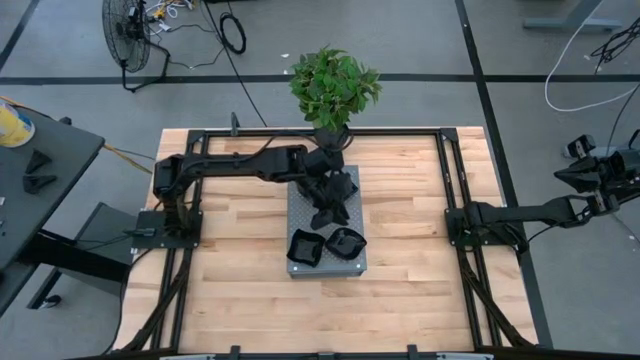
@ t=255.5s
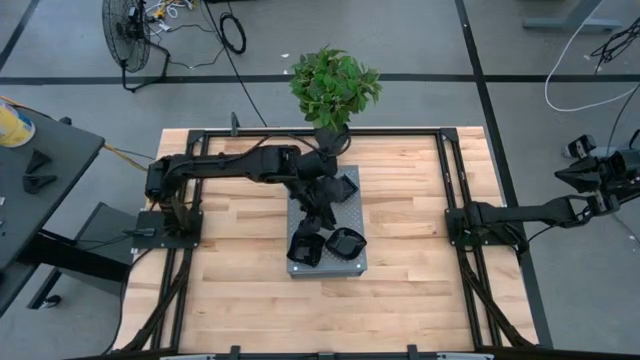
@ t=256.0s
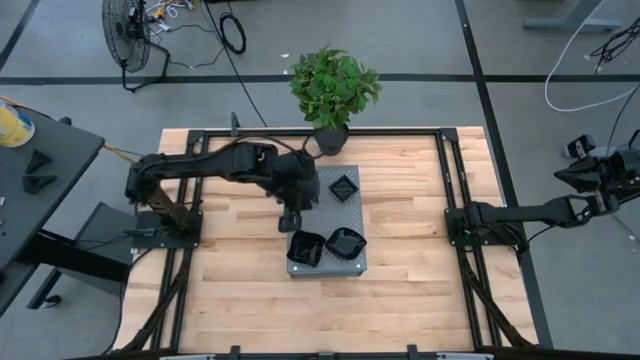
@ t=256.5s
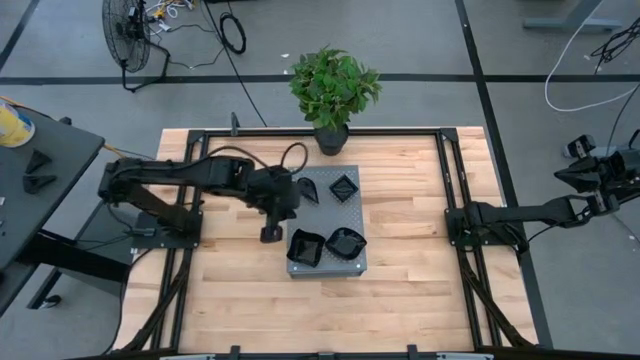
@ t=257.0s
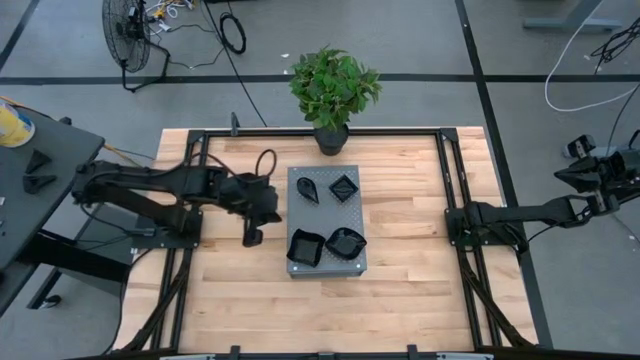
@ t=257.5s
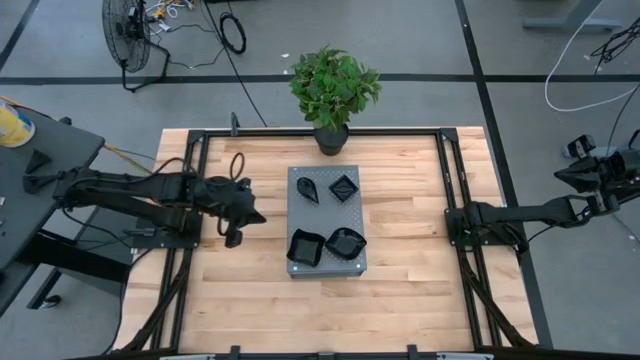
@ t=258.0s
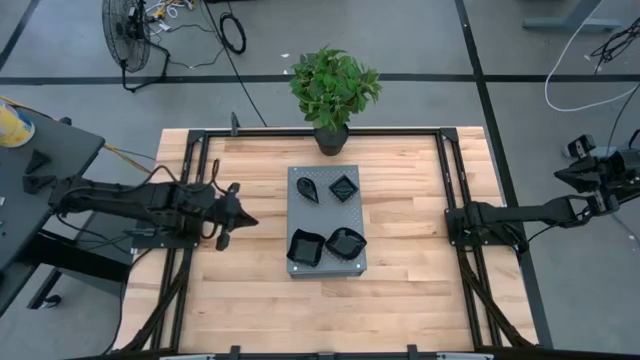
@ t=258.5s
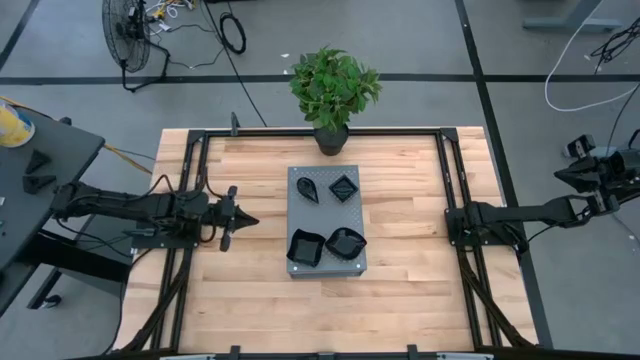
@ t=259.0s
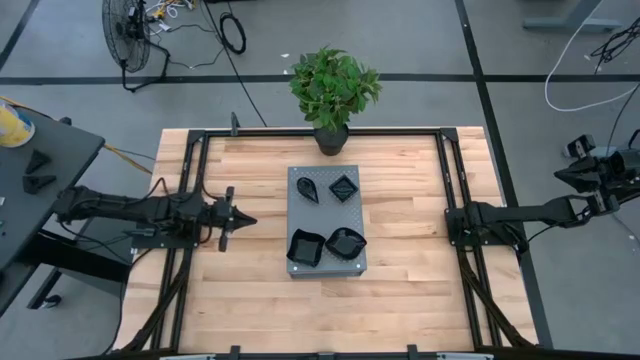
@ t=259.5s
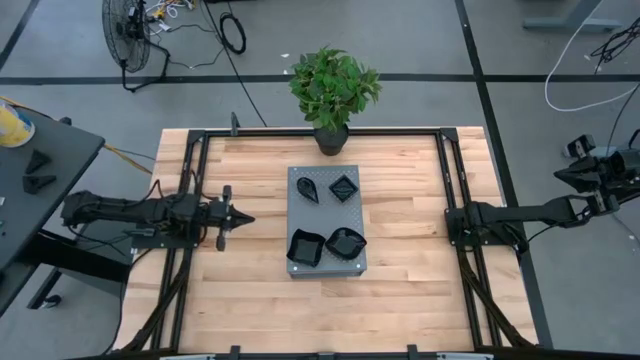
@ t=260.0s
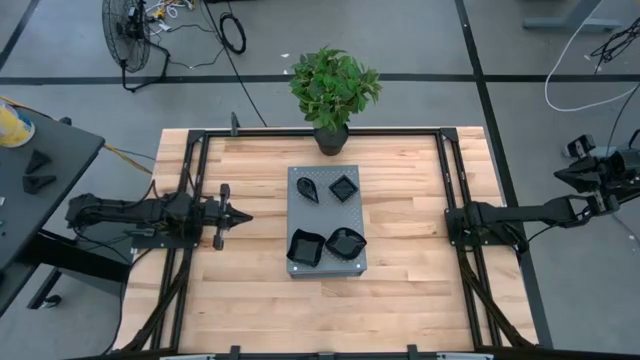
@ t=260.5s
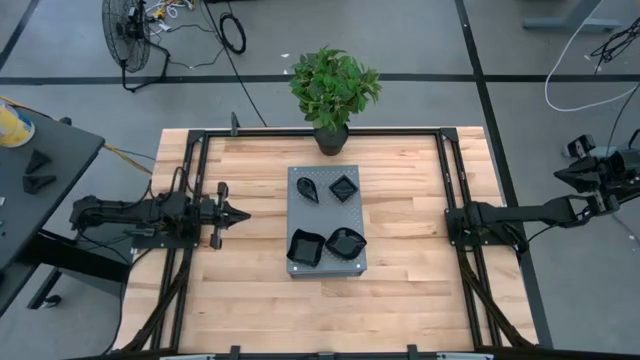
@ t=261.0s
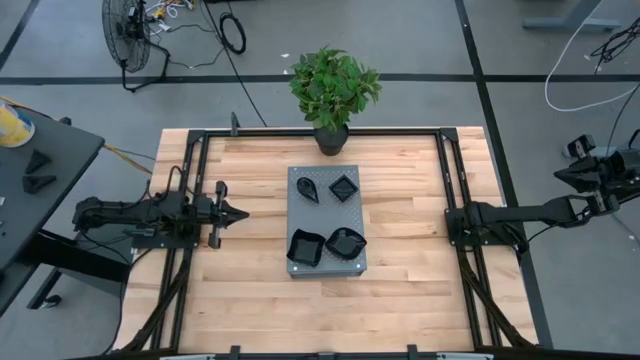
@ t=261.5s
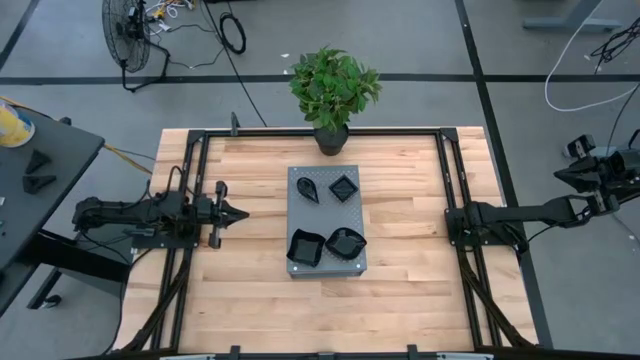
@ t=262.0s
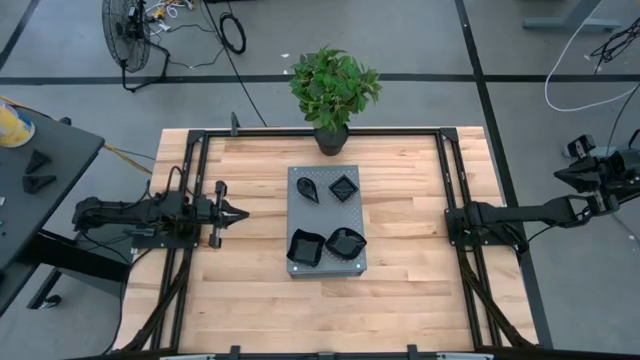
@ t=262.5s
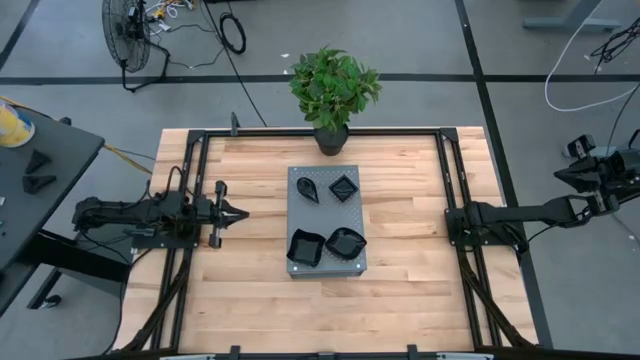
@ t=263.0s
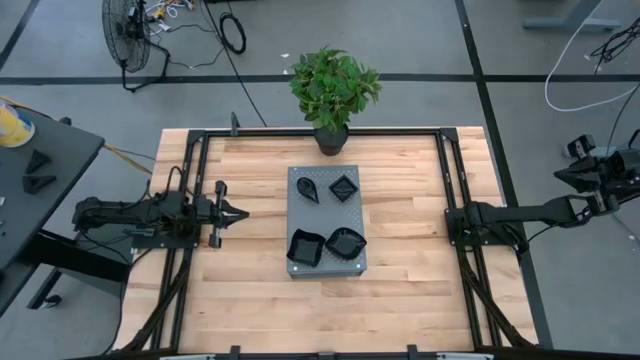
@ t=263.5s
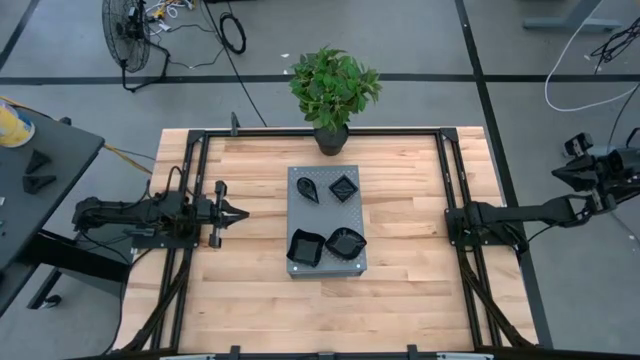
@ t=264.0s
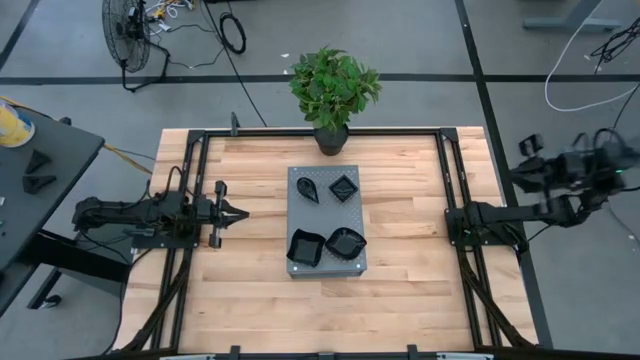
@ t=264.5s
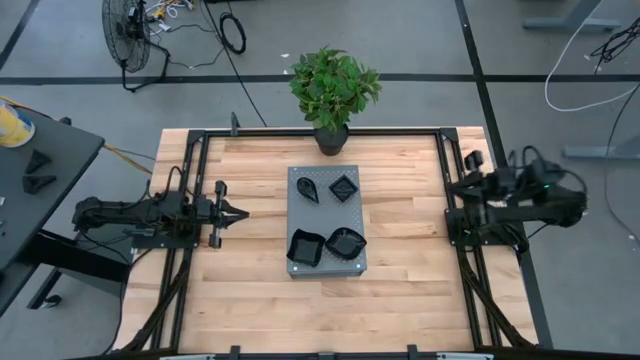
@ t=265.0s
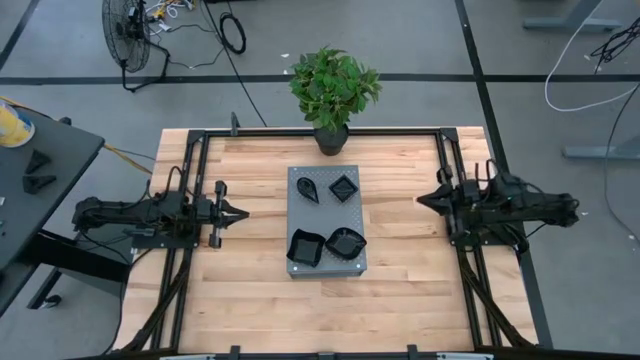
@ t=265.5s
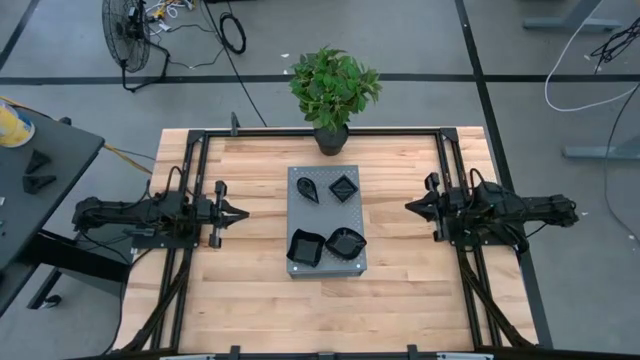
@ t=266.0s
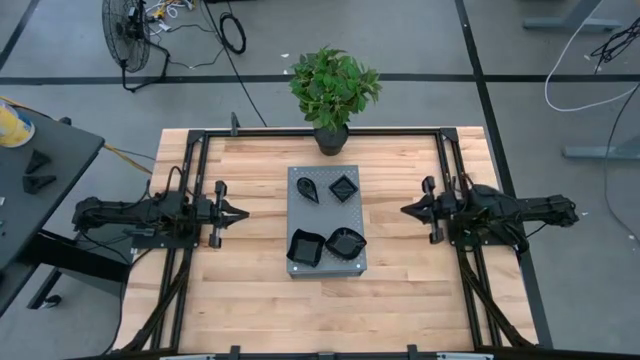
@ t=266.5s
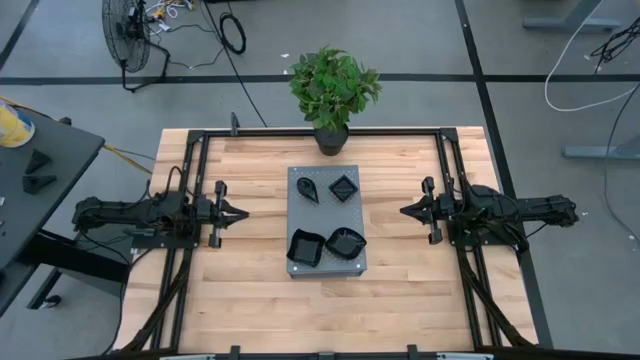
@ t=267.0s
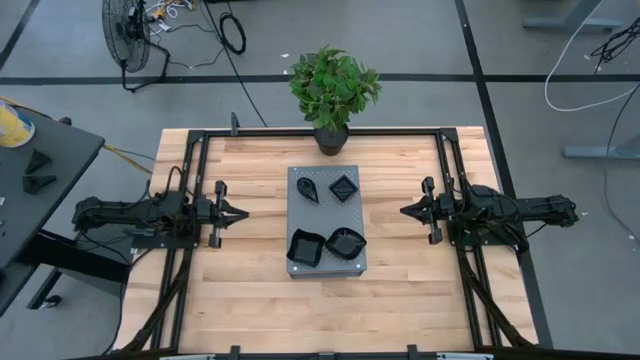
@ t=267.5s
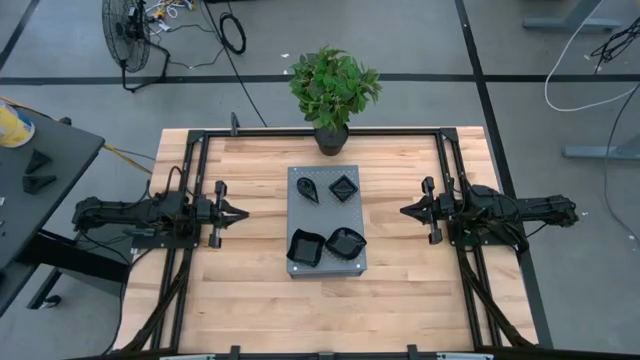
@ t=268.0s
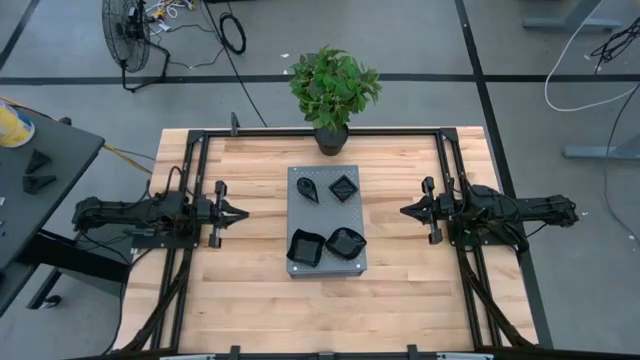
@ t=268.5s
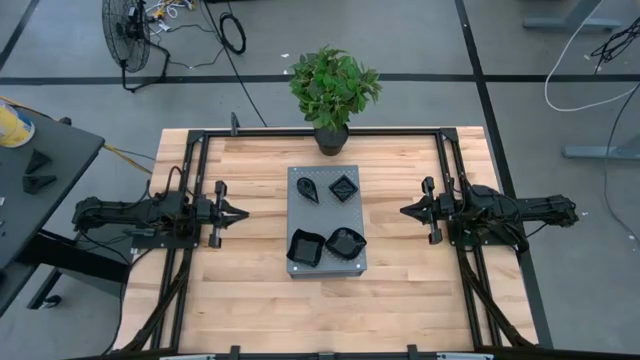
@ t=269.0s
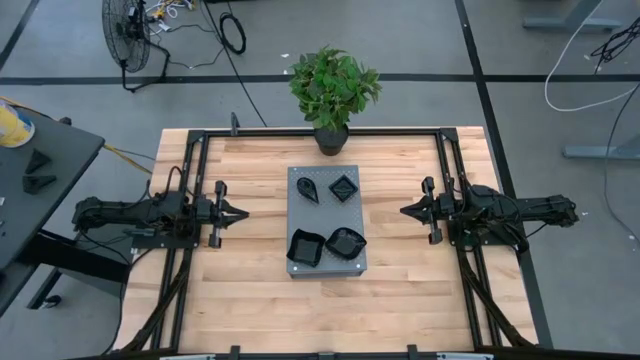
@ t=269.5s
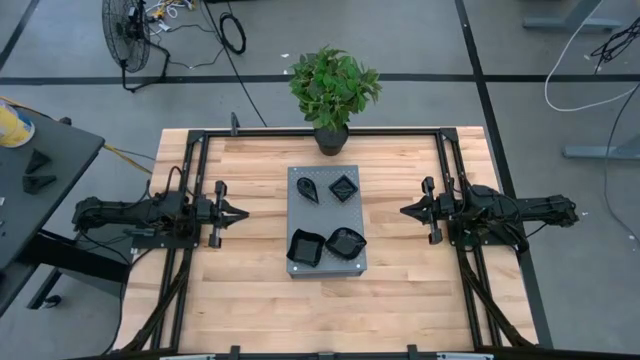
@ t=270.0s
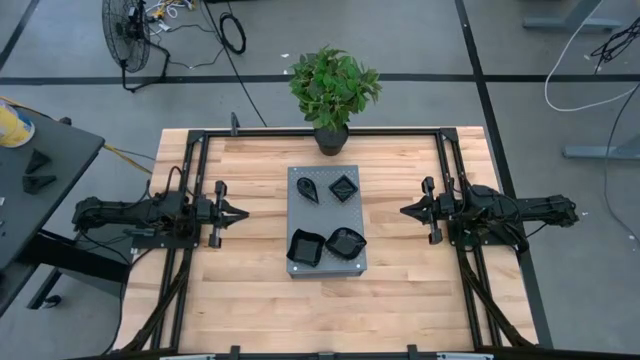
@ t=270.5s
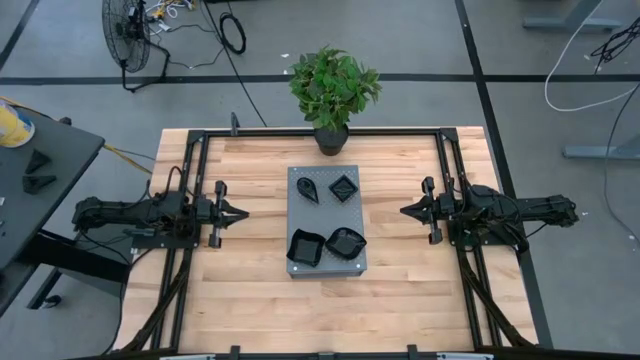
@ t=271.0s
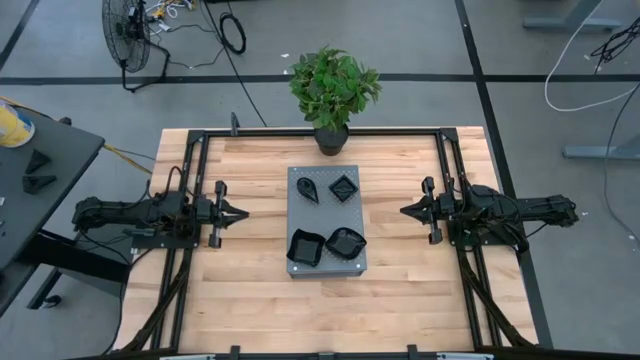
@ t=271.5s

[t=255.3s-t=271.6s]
Task: Pick & Place Mini shaped plates
Return to Home Position

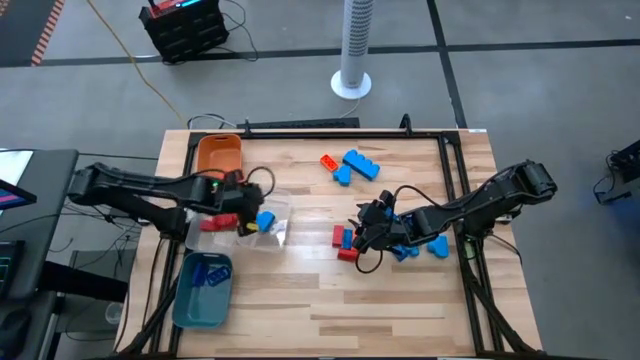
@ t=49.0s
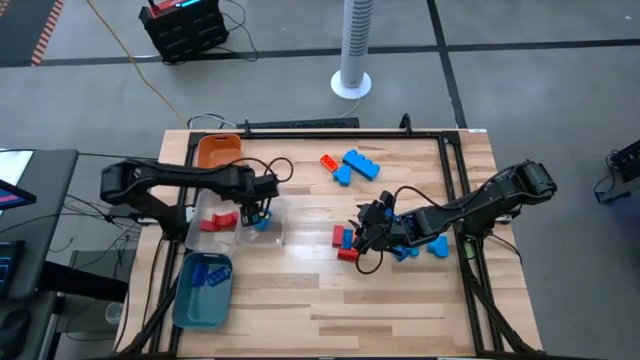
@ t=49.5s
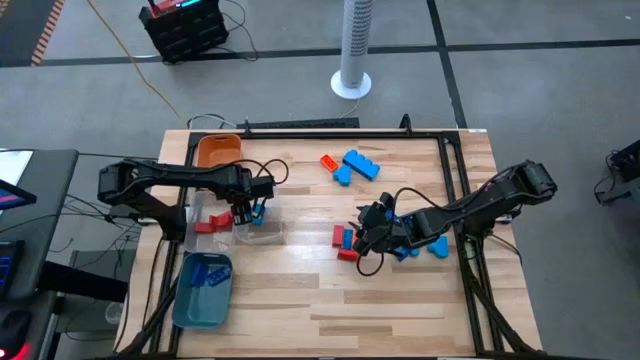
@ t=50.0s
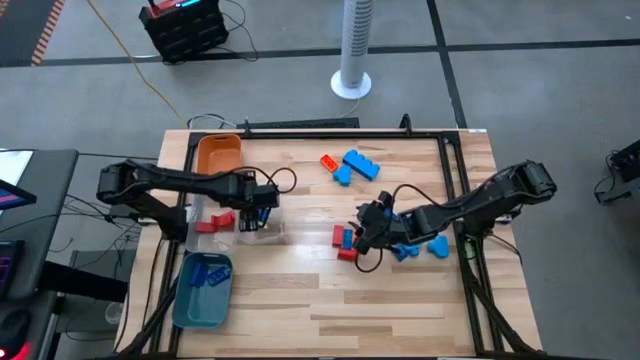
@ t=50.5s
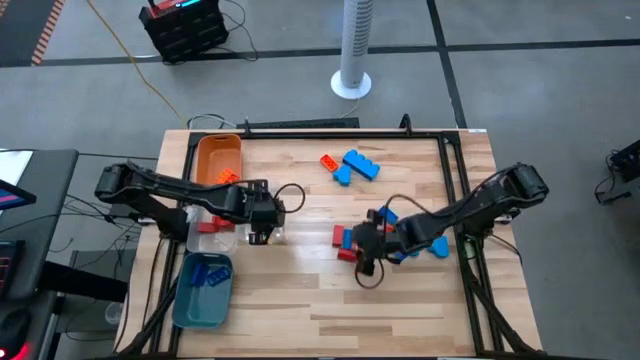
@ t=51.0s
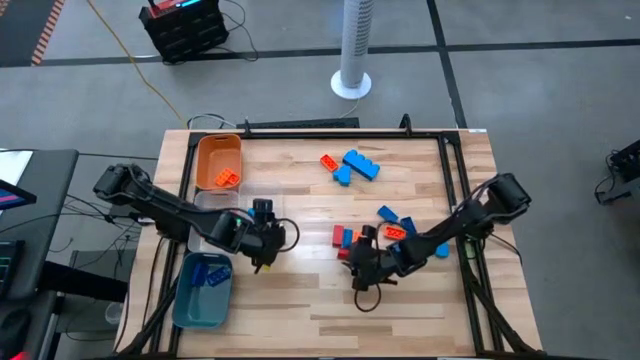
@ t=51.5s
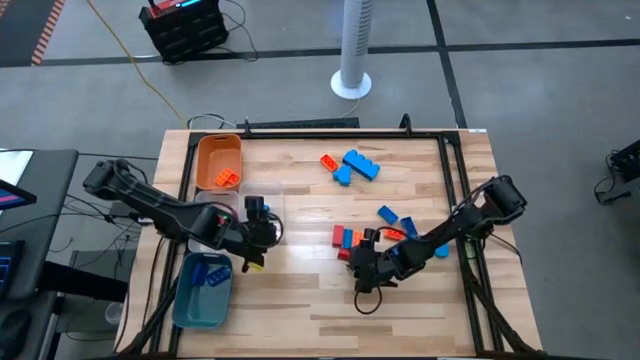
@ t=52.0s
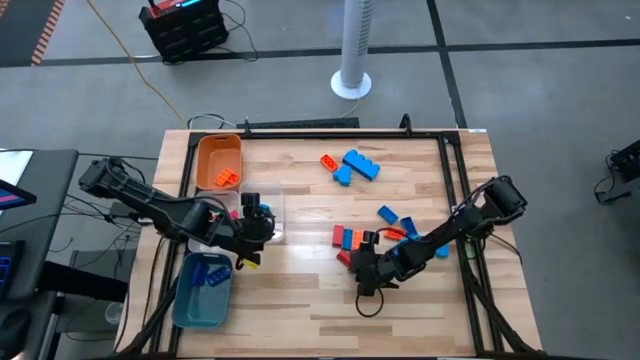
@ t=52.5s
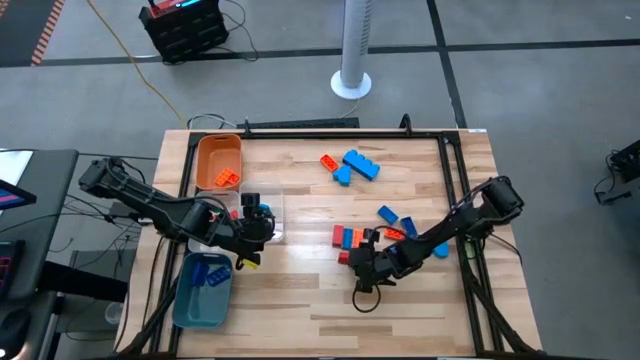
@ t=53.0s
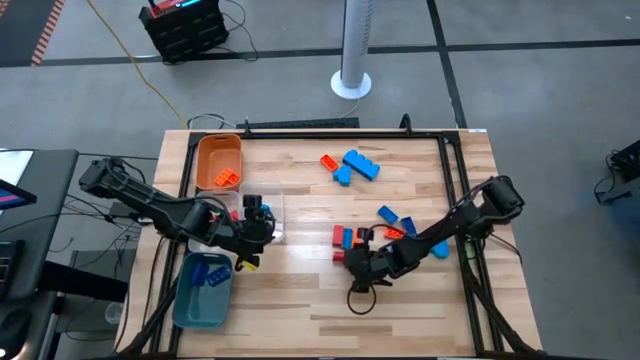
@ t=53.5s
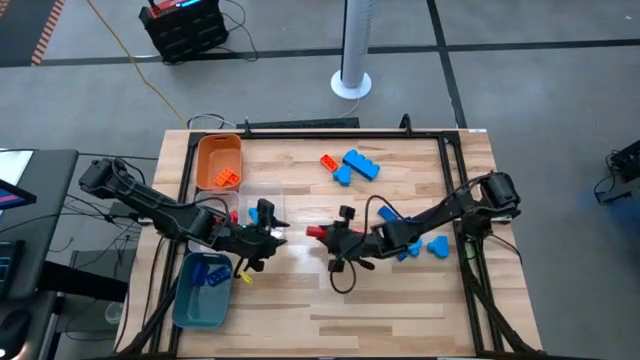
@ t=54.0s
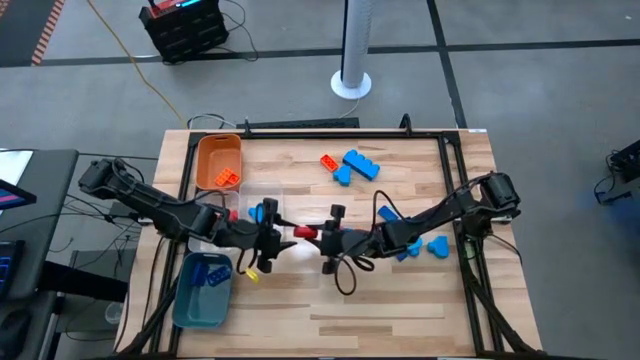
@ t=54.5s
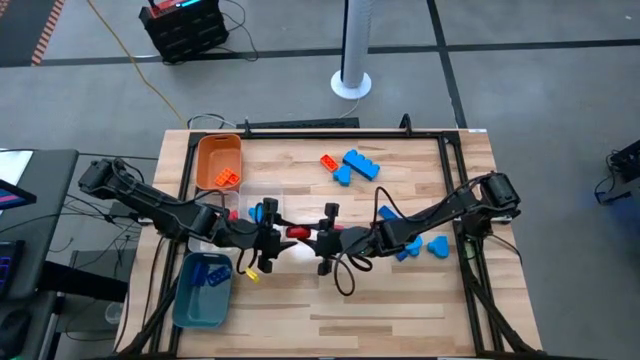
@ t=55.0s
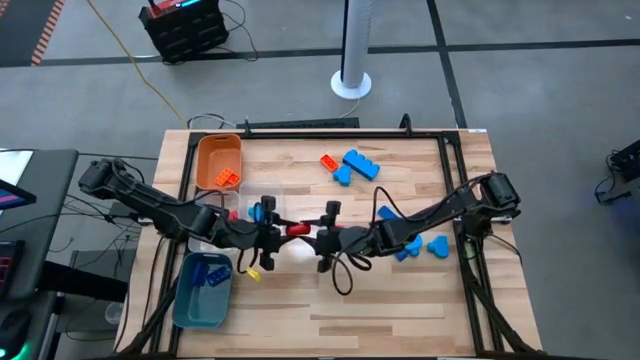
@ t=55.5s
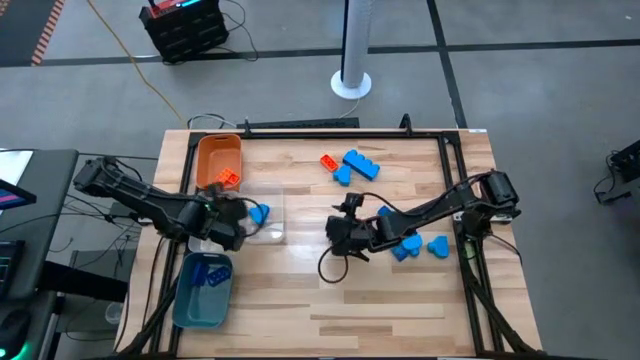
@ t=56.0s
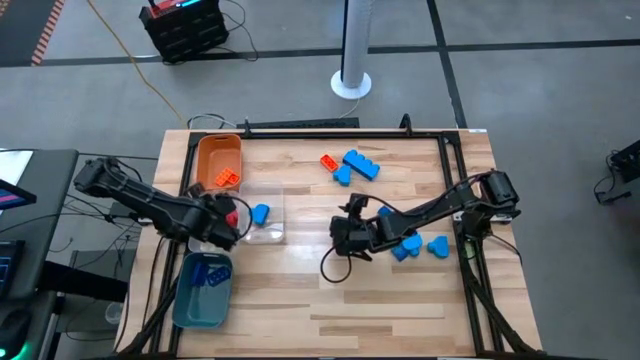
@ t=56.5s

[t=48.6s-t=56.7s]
Task: Sort blocks
Put the red block into the left transparent bin
